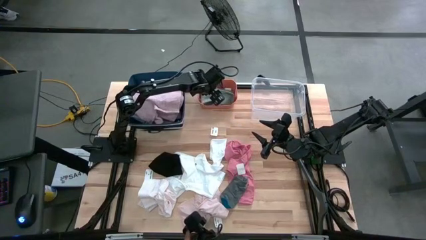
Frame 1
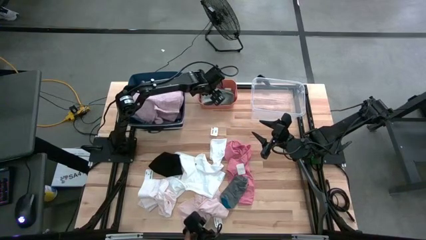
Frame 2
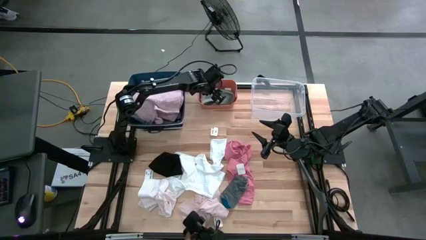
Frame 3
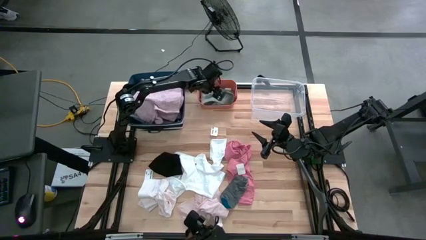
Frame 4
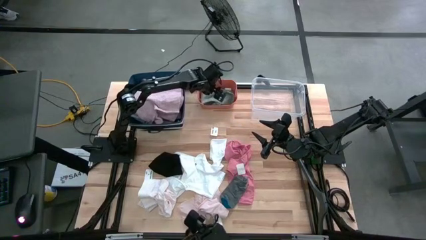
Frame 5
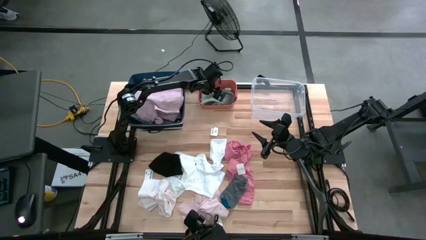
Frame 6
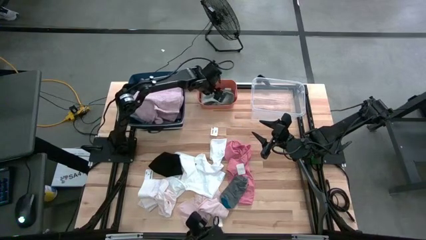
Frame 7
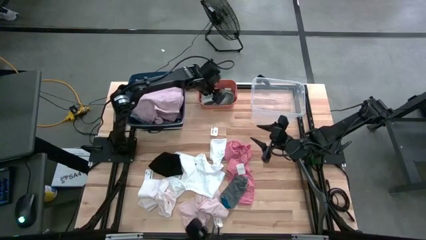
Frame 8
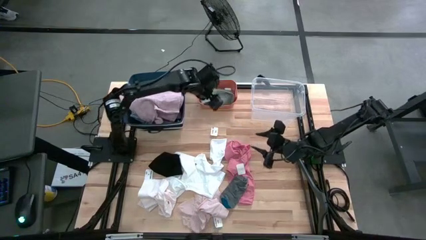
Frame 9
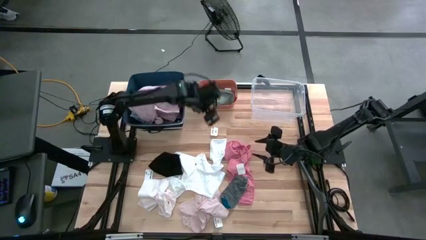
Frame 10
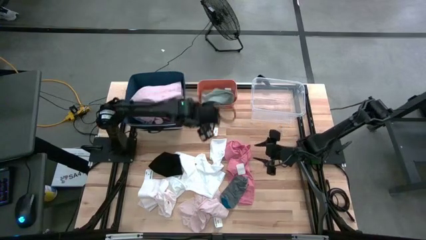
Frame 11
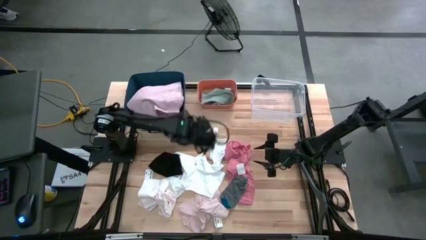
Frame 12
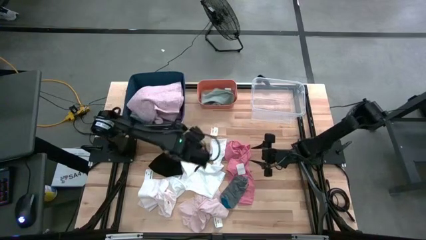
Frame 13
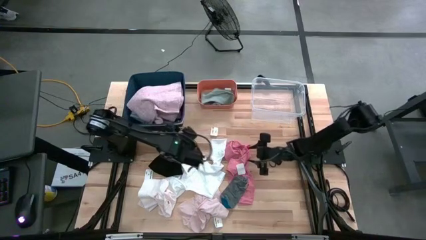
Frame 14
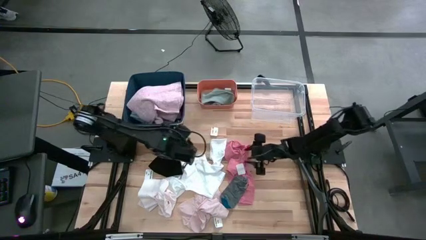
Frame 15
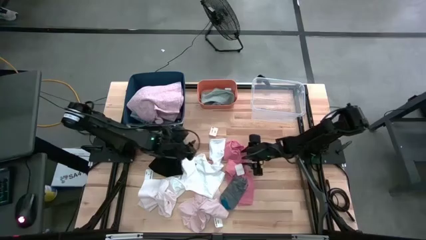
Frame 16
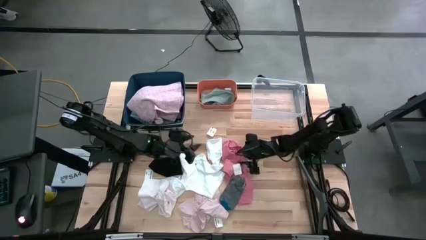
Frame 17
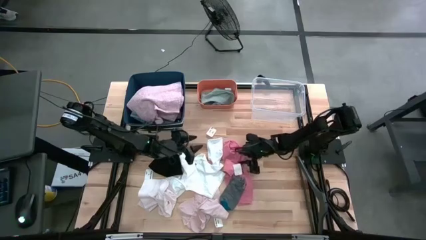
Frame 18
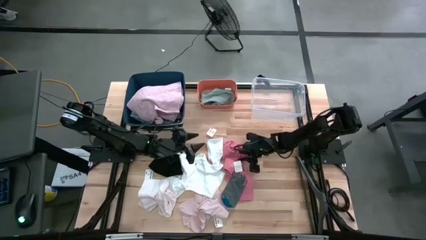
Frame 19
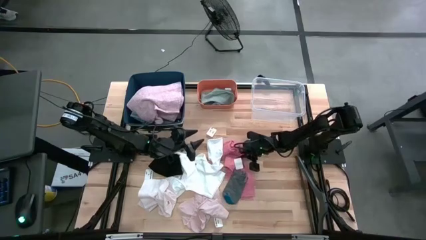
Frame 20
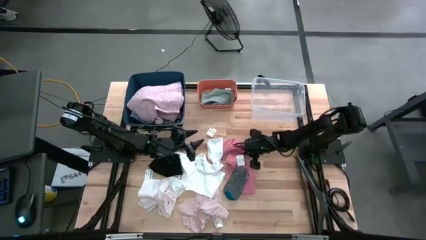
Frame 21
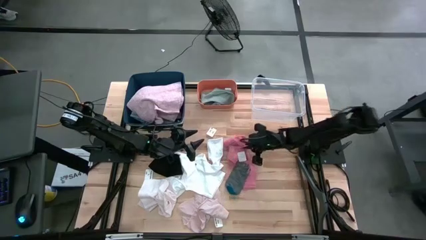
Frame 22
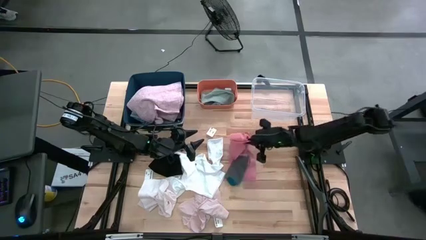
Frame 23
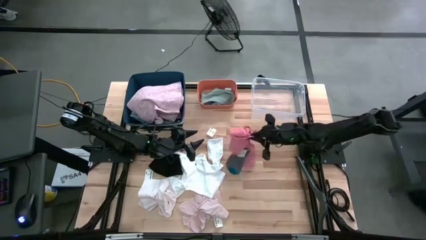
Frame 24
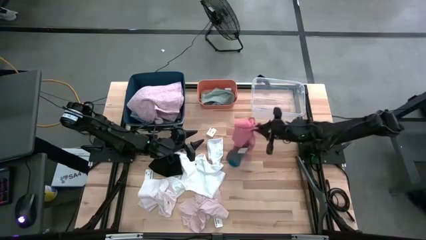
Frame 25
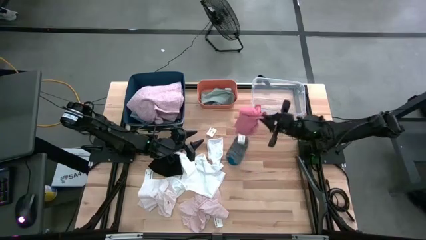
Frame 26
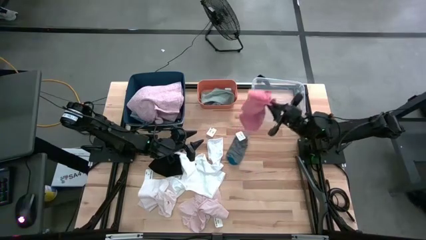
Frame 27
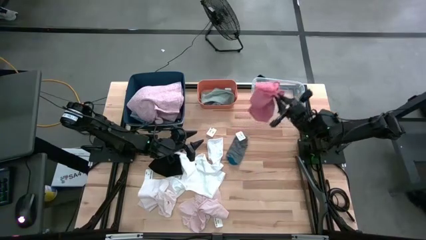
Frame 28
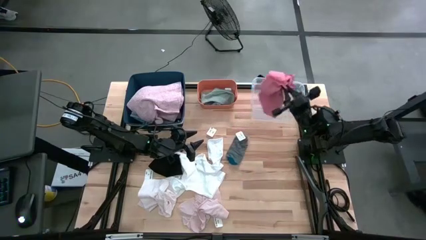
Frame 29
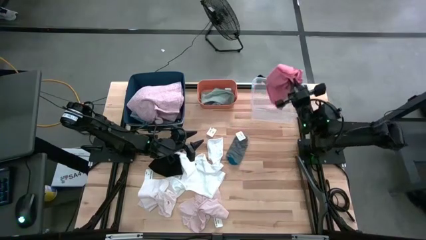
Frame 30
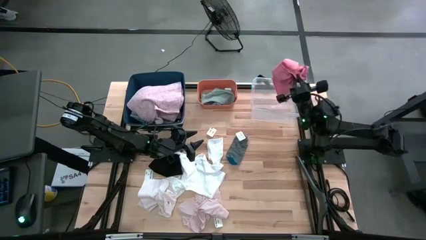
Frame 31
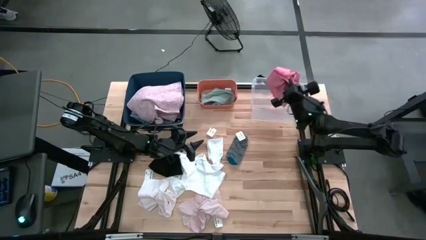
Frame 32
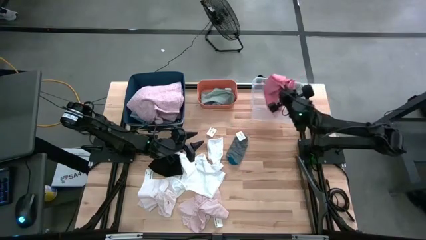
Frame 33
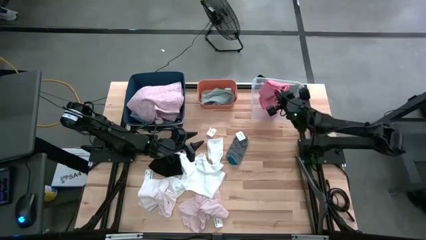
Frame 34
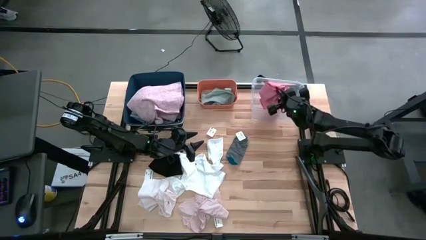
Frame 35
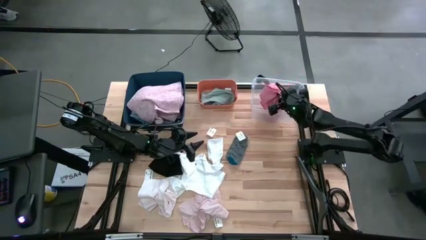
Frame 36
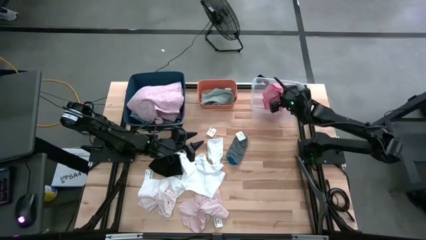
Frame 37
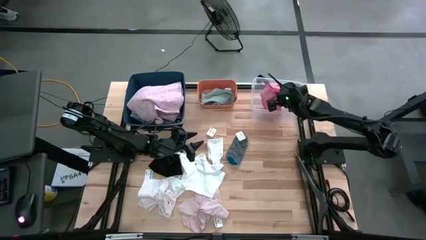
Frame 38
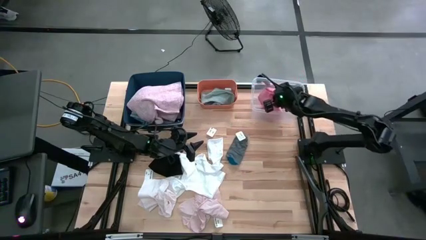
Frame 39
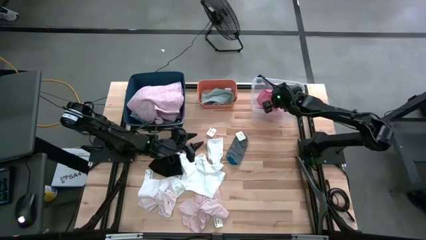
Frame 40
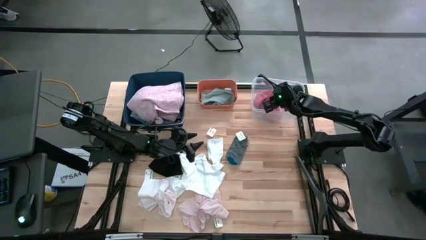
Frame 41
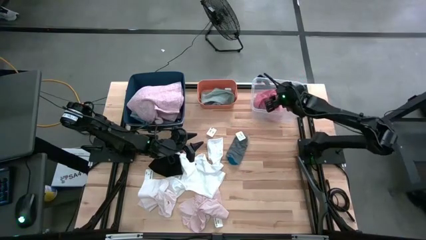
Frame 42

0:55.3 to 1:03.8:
Task: Pick & Place Cloths
Put the pink underwear into the transparent bin
